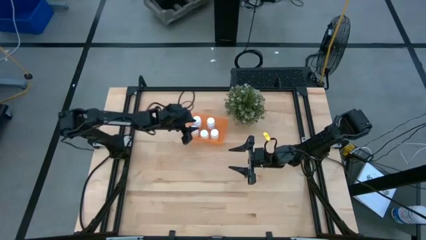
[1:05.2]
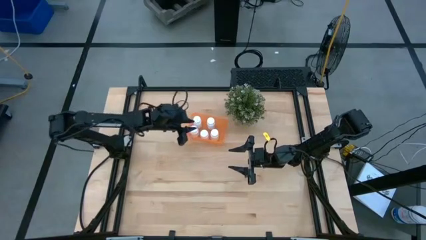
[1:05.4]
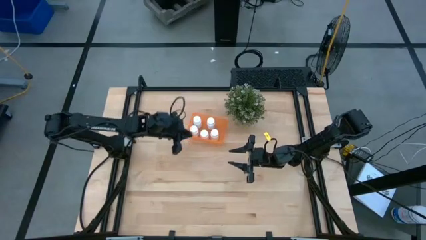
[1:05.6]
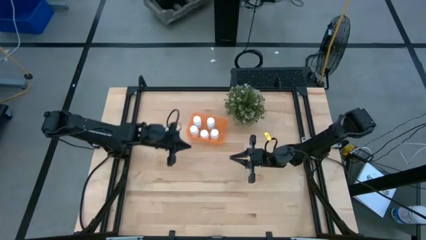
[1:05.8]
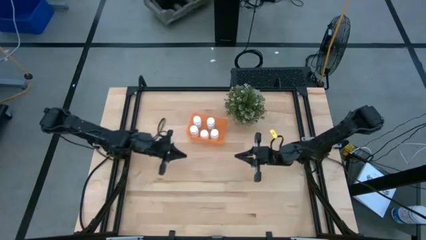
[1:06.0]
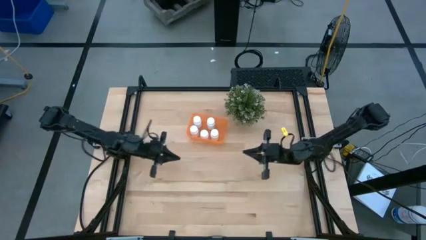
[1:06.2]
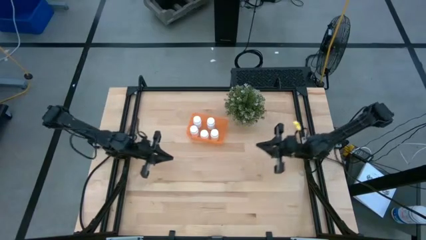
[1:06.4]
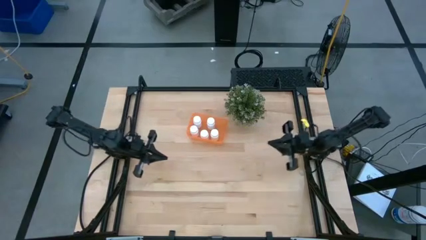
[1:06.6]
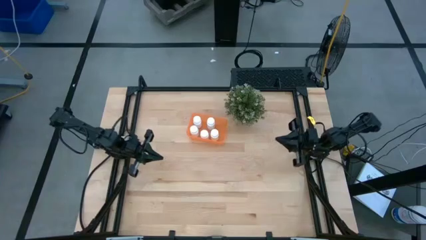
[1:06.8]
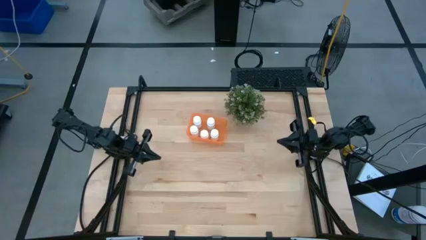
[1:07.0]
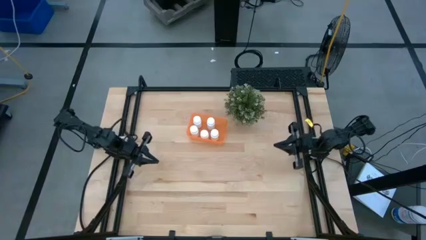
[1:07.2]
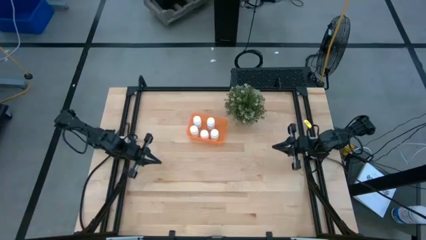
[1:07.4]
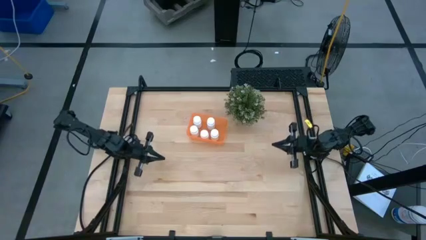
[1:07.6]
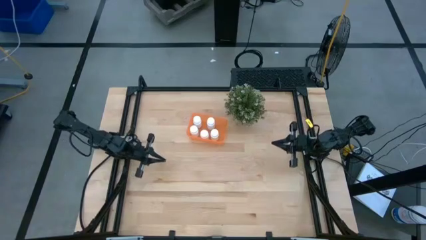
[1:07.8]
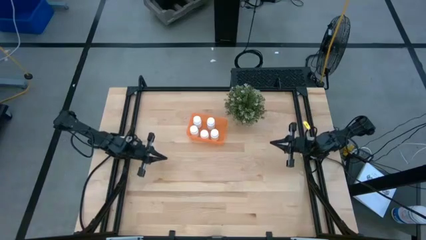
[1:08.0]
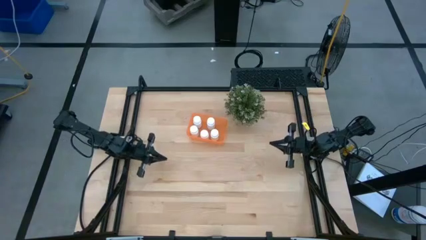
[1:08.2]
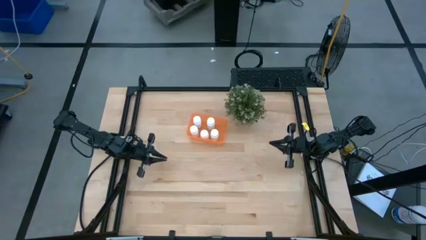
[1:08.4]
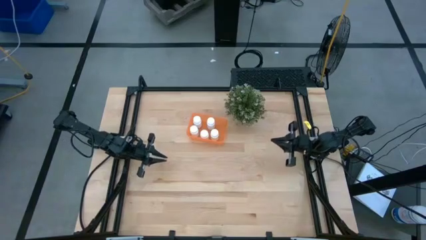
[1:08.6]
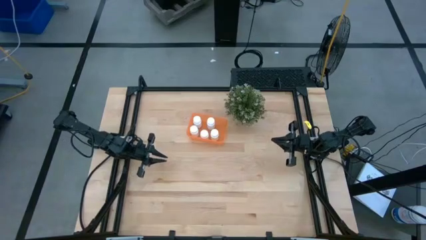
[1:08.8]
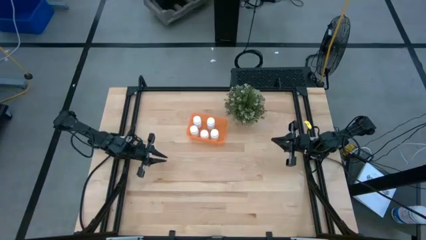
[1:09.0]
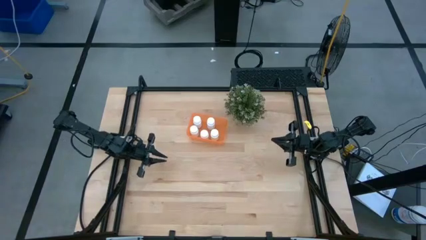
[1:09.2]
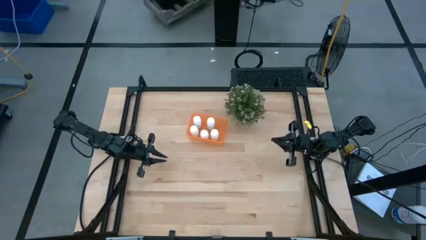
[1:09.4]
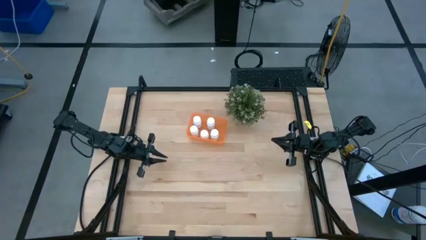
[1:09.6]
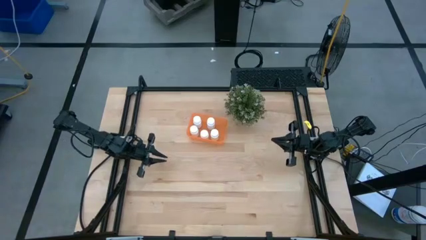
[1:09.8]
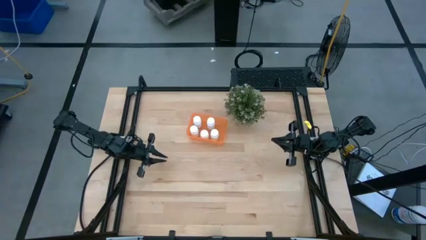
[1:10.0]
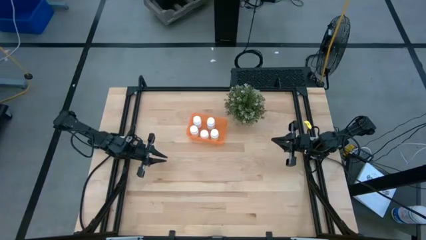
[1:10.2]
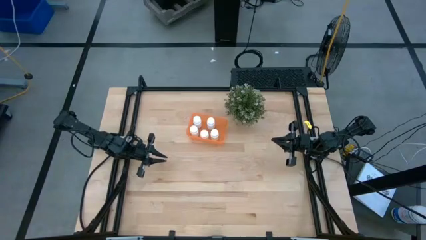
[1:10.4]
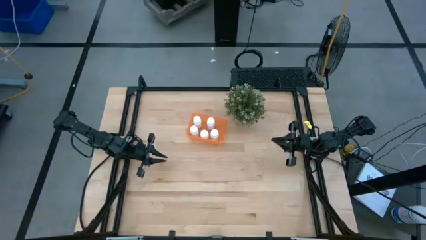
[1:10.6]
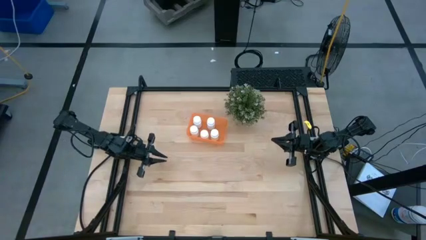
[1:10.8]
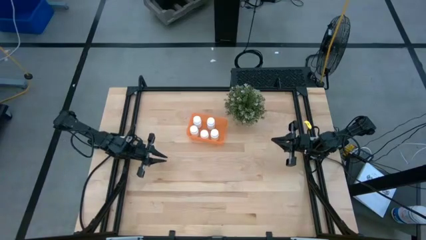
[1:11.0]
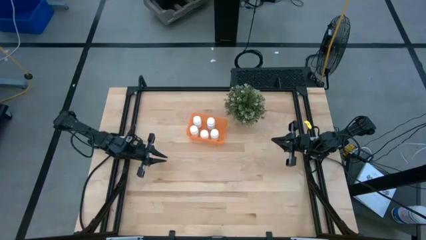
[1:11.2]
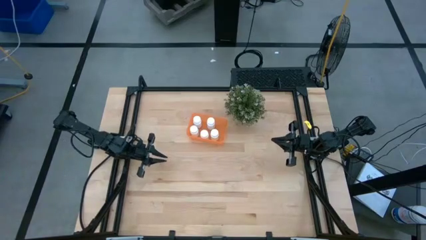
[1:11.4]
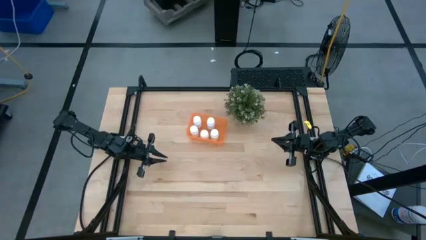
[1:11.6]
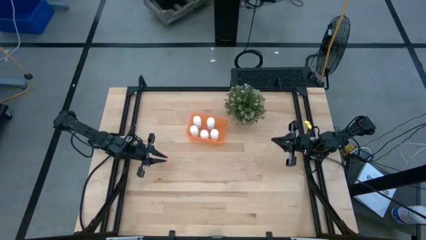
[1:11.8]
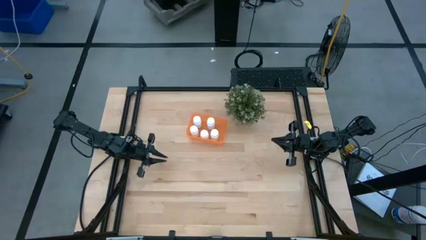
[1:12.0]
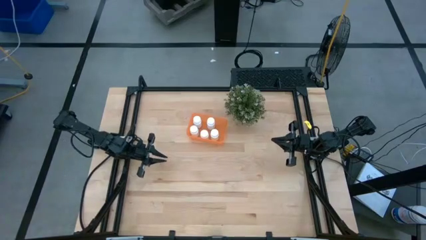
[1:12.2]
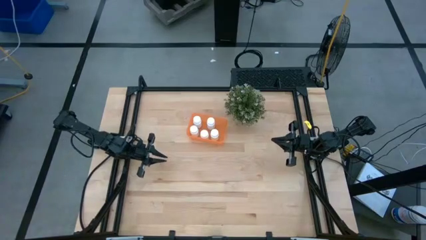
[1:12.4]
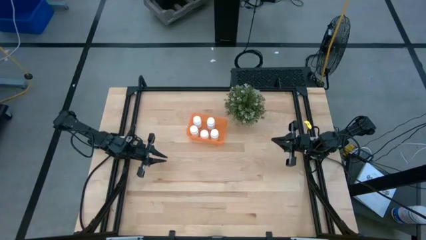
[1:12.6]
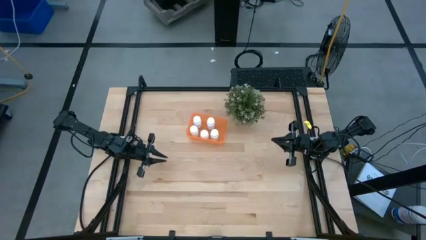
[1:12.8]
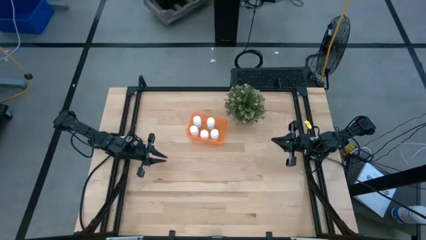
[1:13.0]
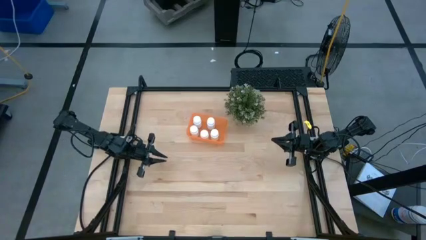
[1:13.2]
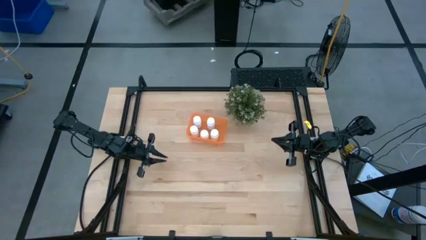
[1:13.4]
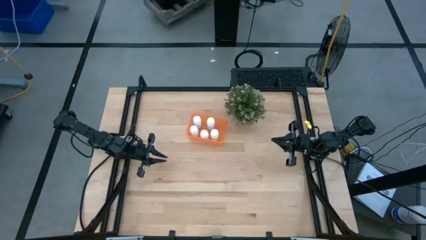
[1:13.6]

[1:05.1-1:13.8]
Task: Pick and place pill bottles into a basket
Return to Home Position

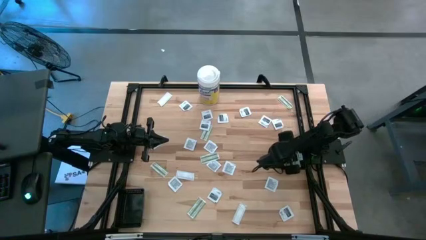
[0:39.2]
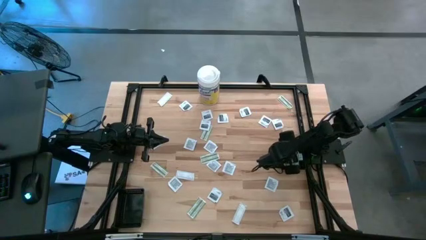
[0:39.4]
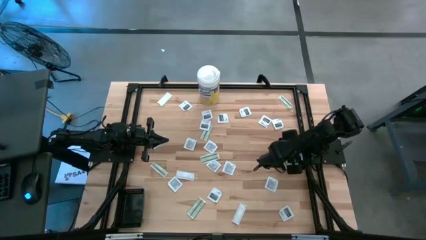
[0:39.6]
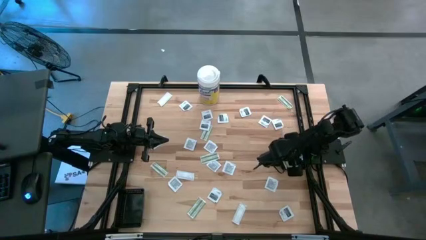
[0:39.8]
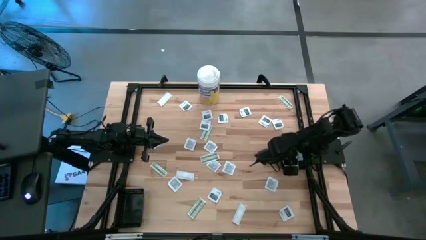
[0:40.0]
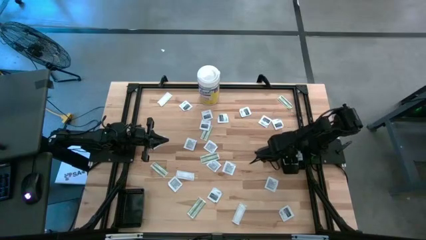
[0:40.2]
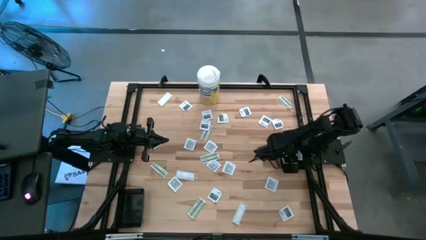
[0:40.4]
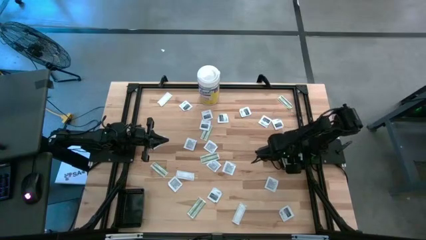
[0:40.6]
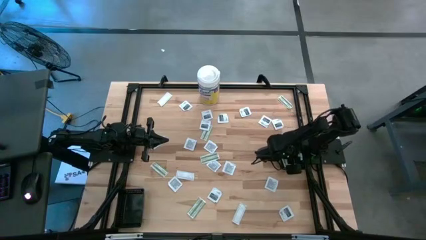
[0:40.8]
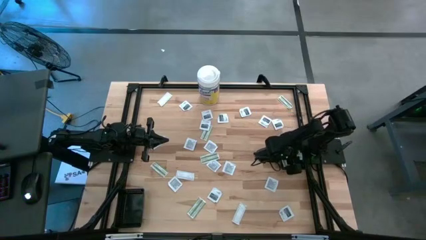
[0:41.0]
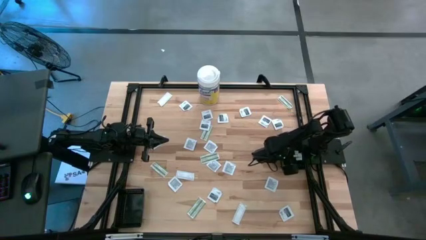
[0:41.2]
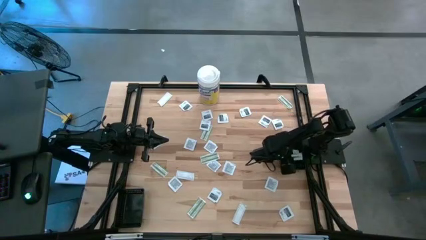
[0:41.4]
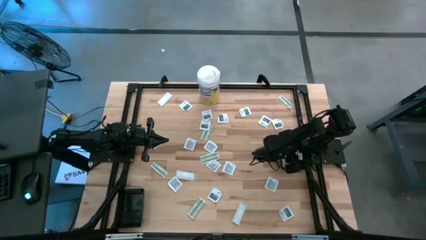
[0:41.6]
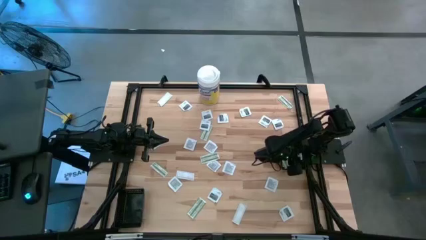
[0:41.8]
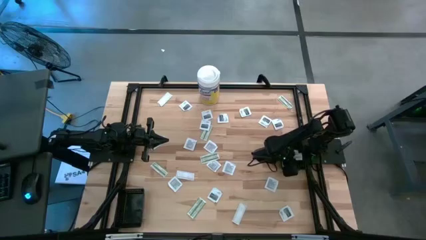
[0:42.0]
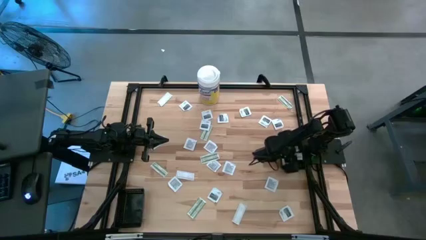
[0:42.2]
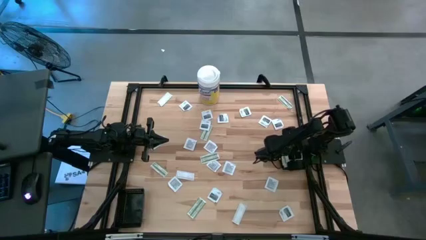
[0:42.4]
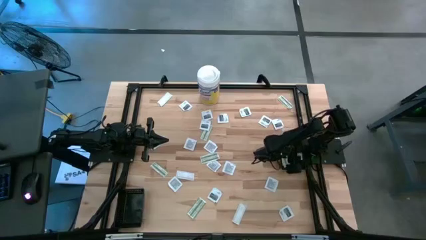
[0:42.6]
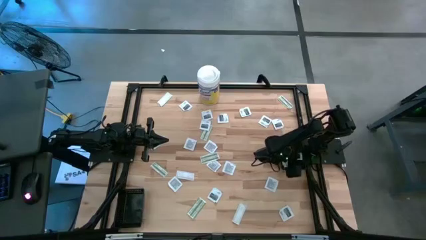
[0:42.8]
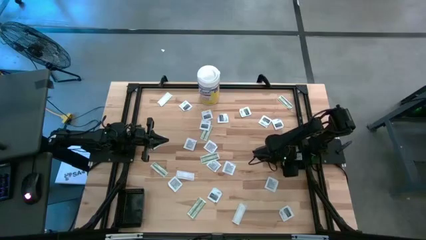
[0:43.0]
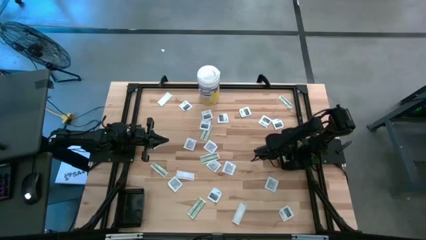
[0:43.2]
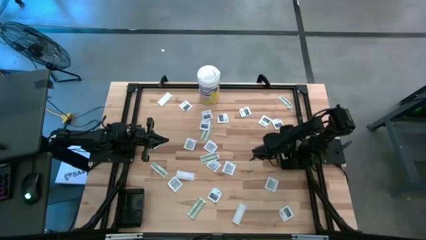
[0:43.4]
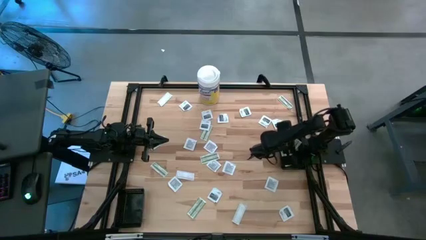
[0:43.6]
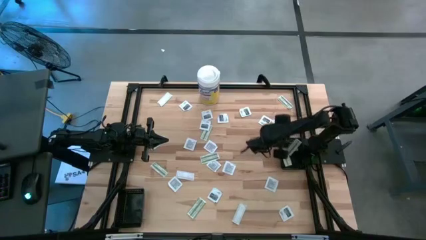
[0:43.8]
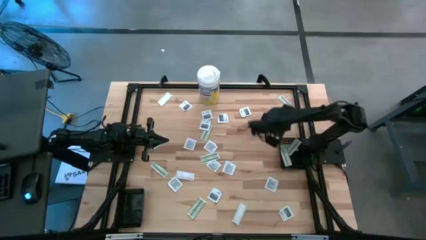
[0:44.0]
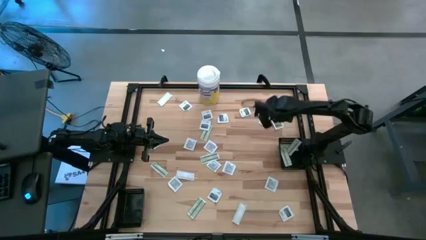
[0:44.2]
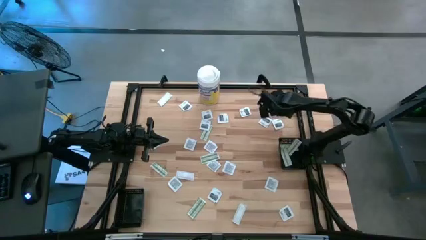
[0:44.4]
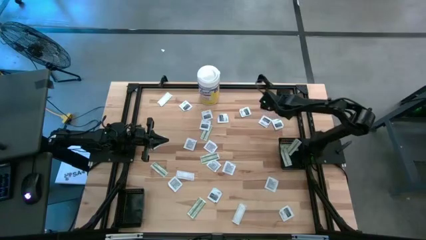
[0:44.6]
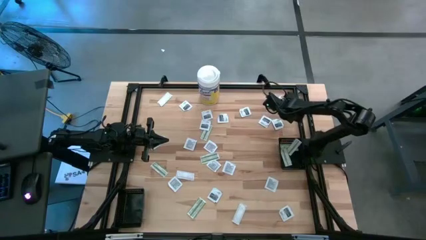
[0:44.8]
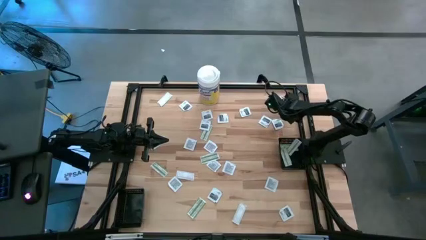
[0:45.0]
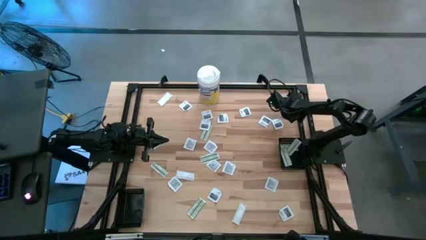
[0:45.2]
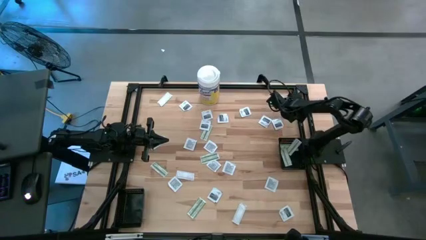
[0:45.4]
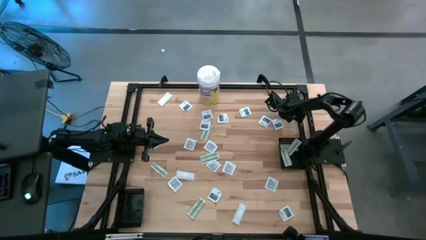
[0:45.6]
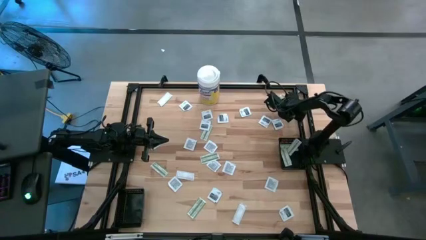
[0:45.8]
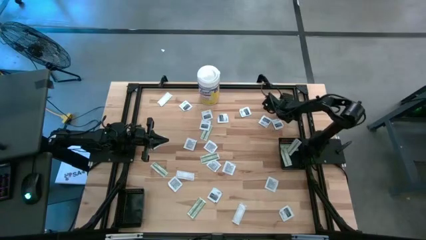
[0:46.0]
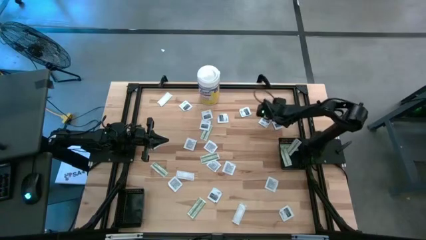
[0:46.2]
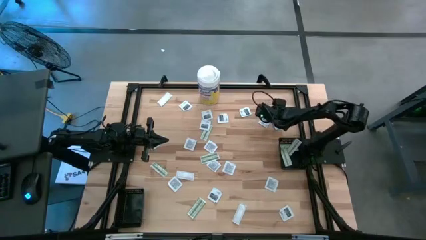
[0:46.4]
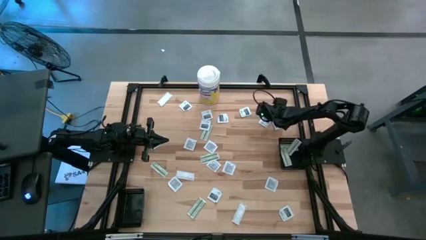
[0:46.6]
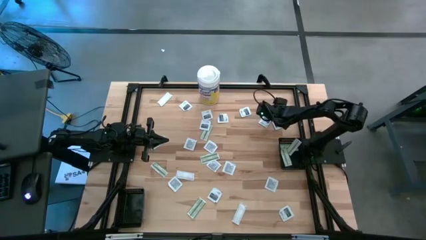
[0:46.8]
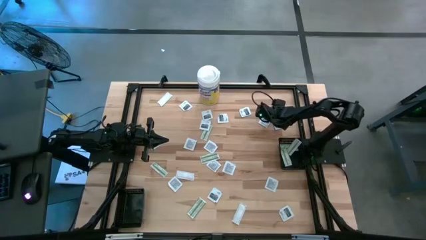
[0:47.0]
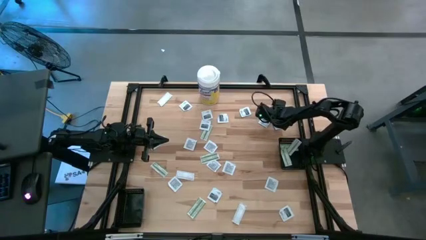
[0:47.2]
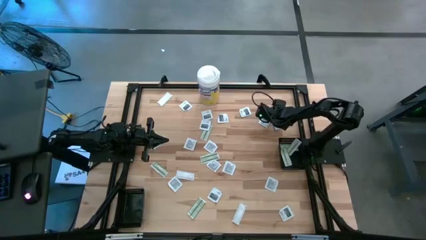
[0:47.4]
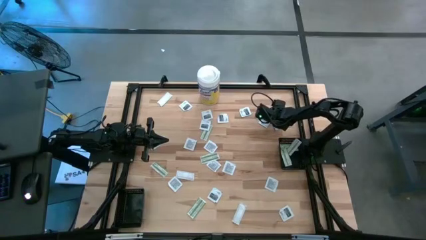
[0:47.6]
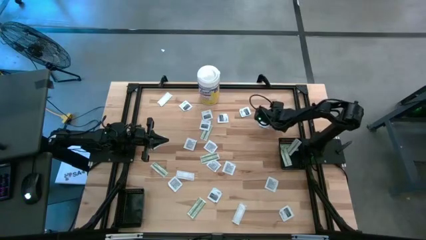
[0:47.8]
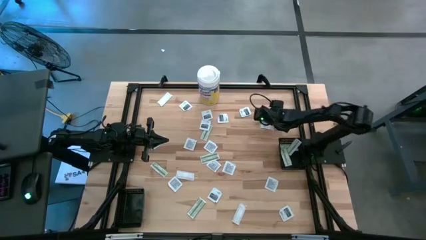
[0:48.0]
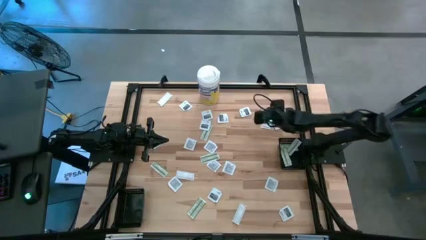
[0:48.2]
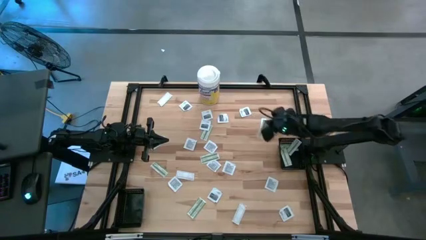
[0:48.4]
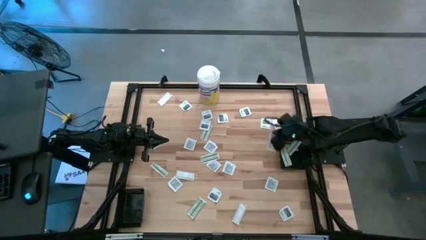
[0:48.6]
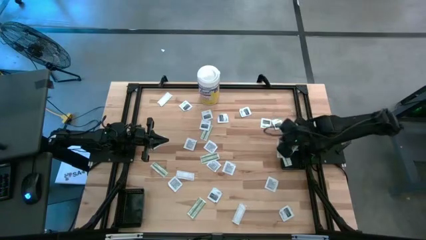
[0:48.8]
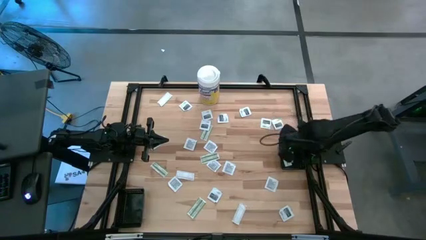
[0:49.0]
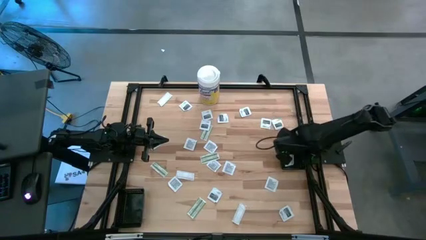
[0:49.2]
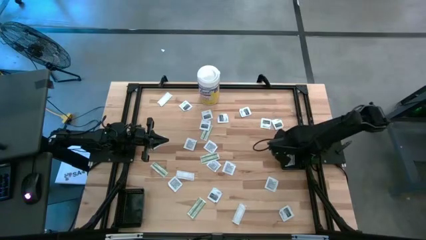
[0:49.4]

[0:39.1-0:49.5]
Task: Pick & Place First Aid Supplies
Put the white bandage pad into the black bin
